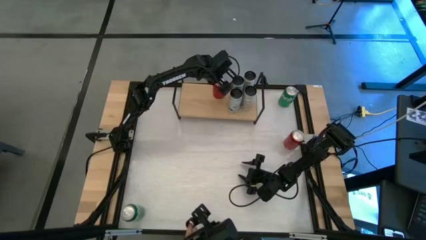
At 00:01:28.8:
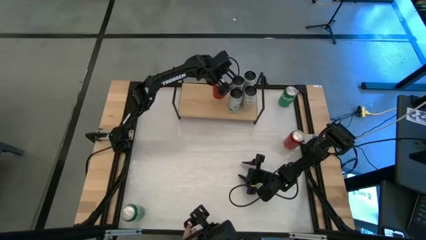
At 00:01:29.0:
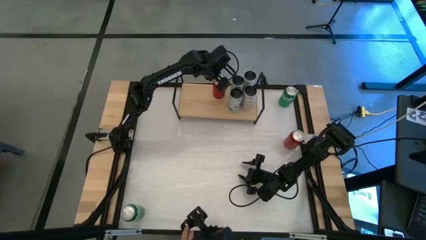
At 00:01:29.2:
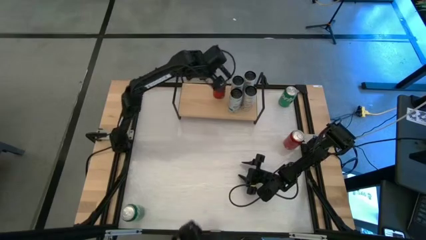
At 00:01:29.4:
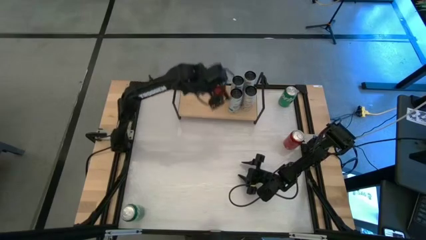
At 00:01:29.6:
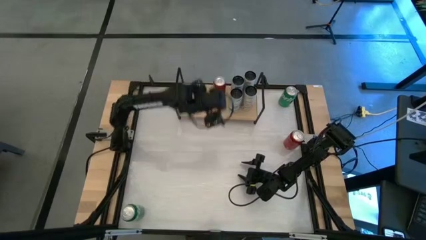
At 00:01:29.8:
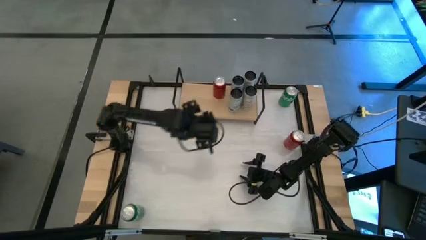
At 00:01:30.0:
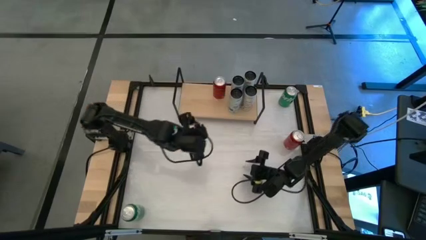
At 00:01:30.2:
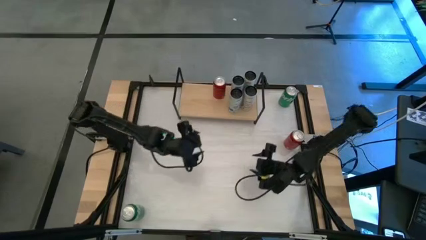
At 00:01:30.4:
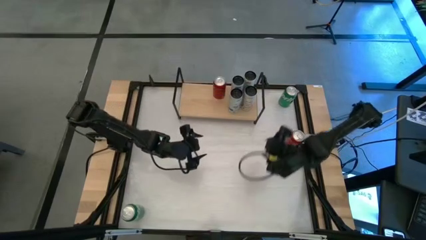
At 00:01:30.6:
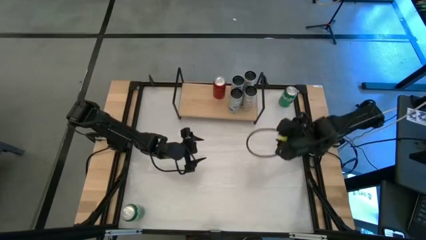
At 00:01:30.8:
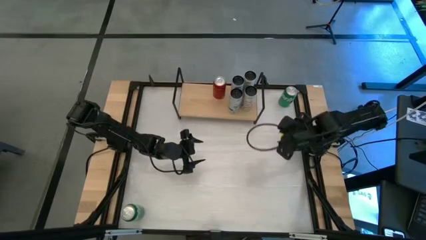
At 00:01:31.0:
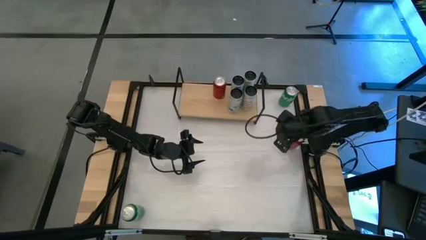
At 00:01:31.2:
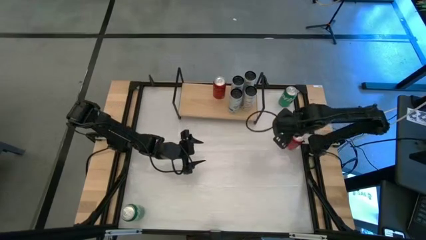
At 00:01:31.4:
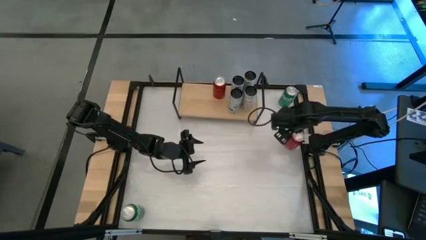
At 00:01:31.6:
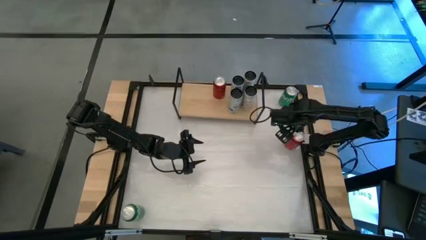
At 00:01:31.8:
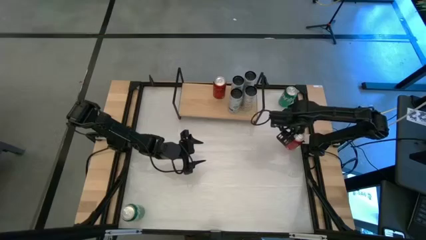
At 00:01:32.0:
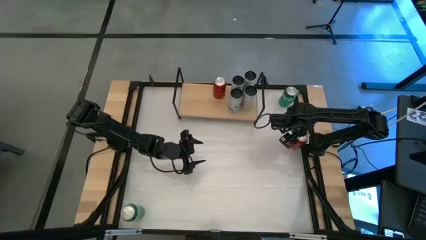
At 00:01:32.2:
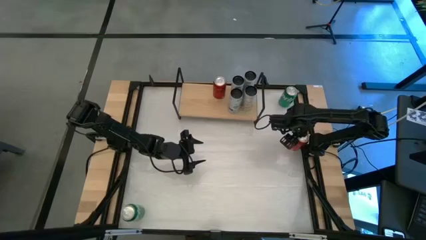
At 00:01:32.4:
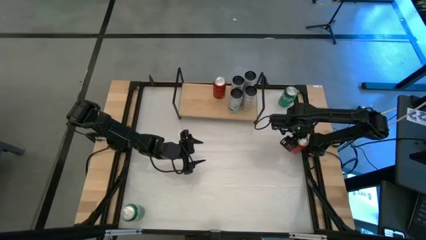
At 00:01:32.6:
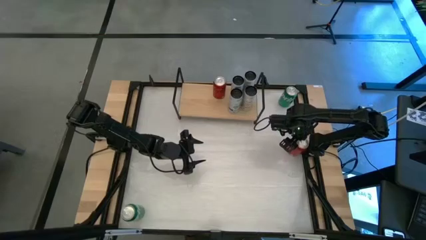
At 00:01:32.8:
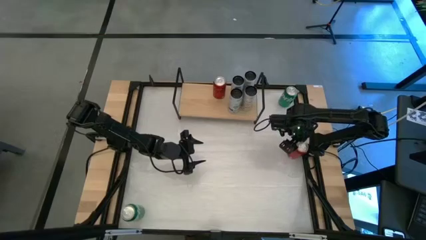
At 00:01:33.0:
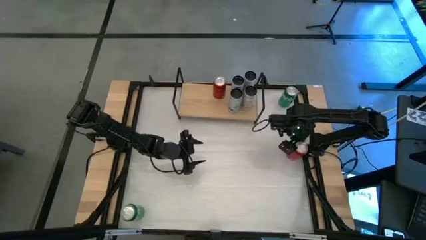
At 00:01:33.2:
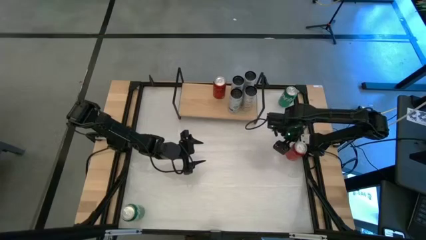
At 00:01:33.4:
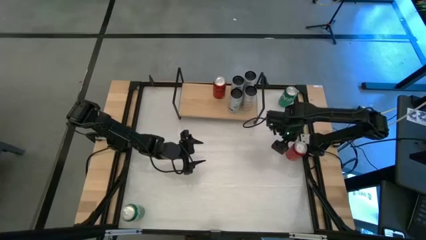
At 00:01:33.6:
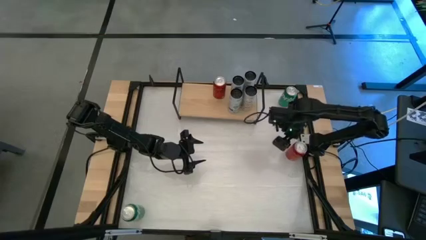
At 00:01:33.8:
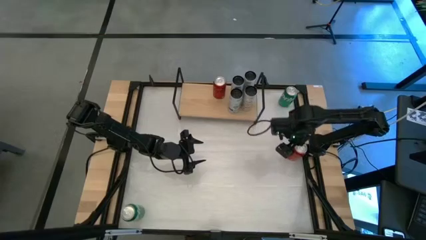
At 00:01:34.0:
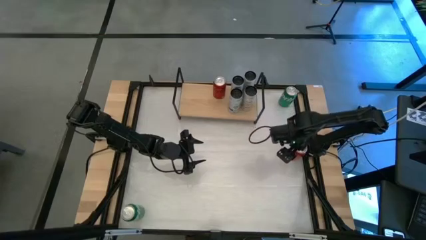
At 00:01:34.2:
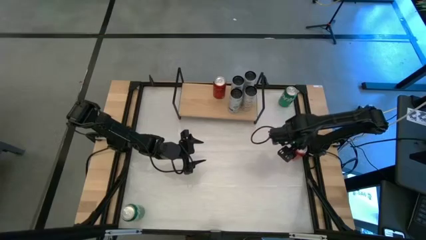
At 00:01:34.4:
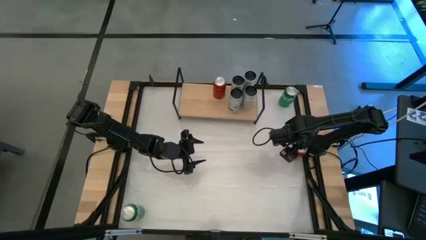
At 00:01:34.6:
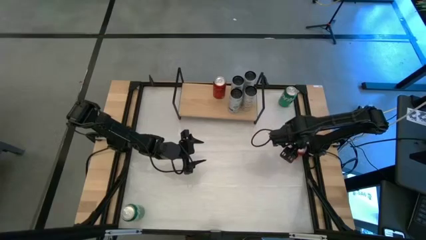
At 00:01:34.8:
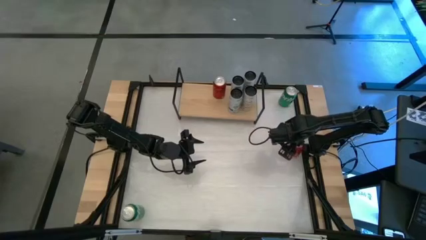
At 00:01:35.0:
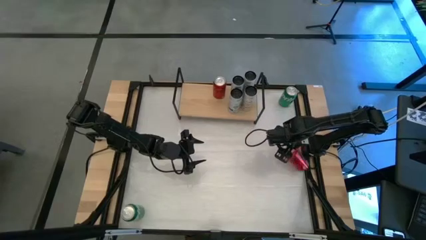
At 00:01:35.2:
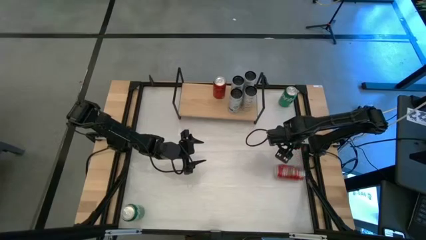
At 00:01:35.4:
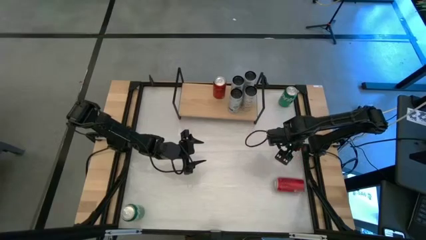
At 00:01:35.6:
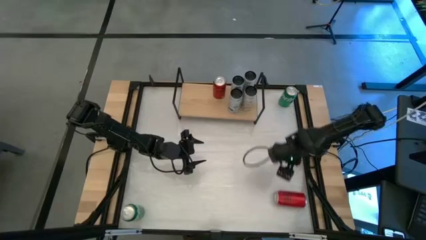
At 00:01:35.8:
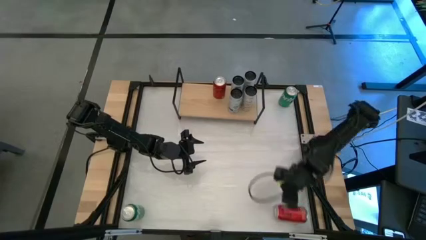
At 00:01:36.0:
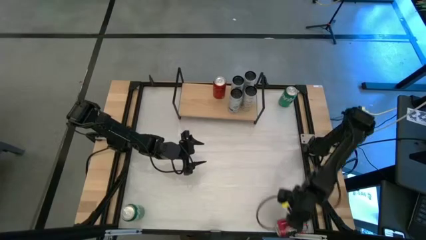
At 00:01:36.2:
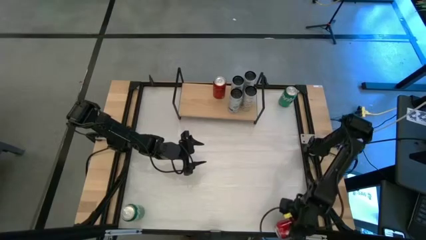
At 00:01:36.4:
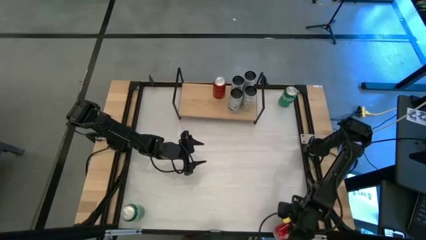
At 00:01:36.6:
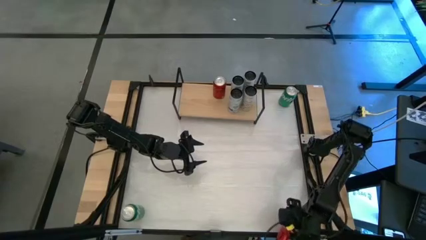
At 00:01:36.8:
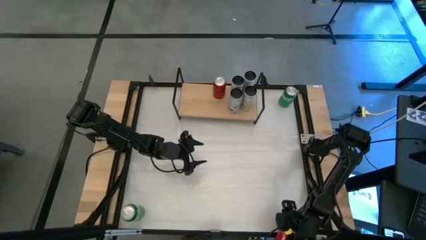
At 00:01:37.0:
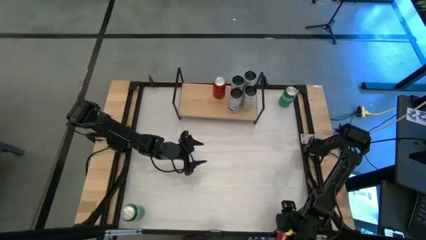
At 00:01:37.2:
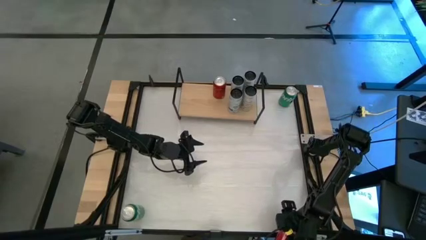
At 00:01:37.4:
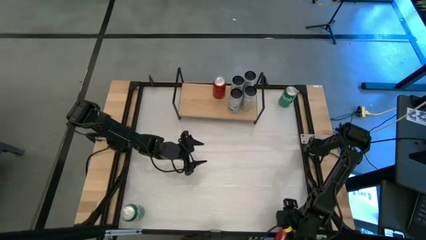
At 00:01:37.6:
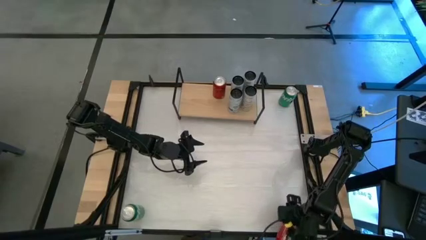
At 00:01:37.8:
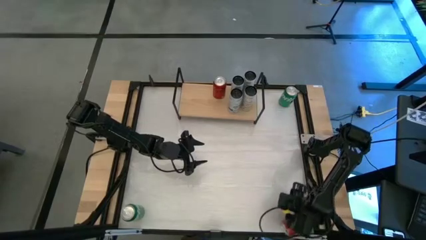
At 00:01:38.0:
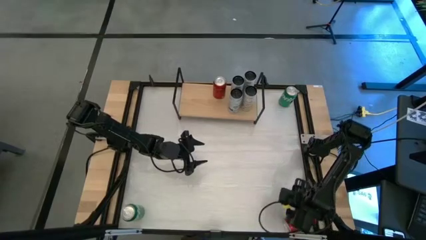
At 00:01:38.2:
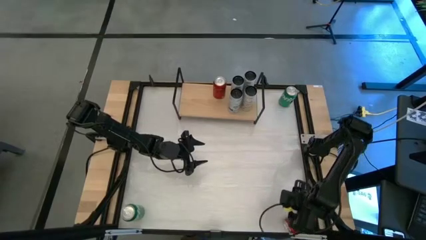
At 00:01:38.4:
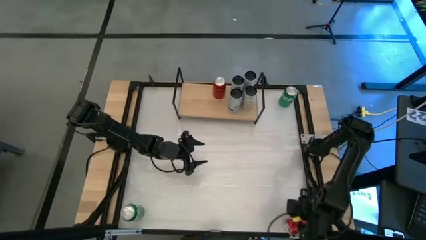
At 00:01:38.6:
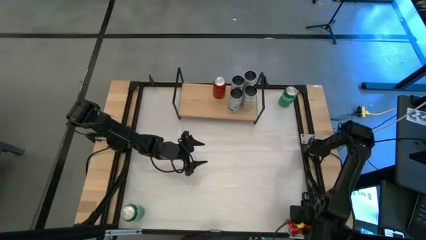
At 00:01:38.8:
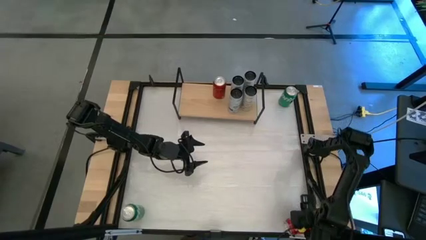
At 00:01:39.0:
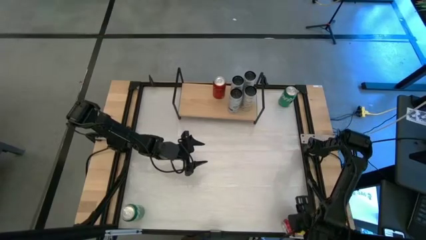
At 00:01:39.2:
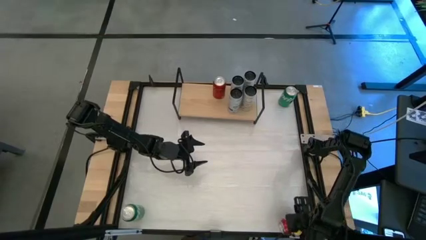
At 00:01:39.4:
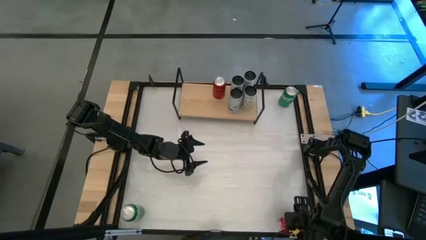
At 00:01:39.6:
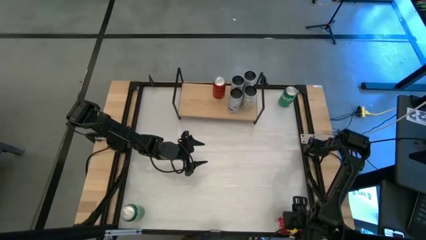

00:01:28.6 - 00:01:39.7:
Task: Place canned beverage on shelf
Put the red soda can on the shelf aligned with the other red soda can

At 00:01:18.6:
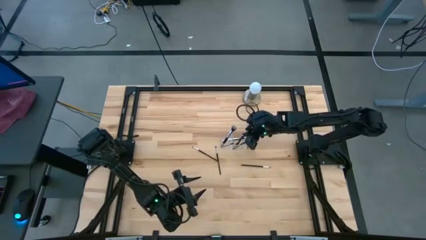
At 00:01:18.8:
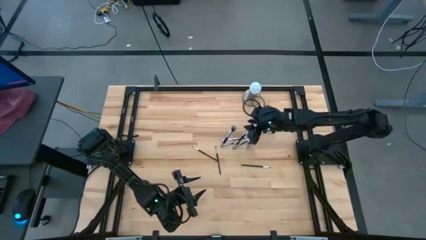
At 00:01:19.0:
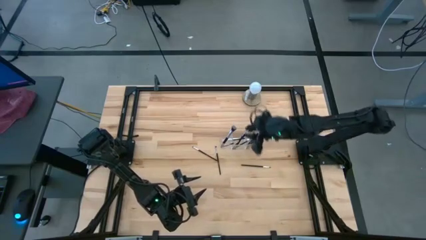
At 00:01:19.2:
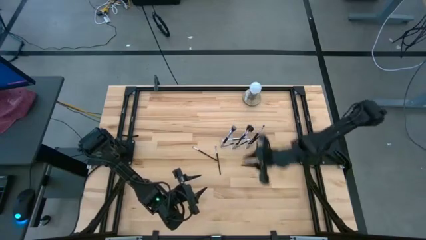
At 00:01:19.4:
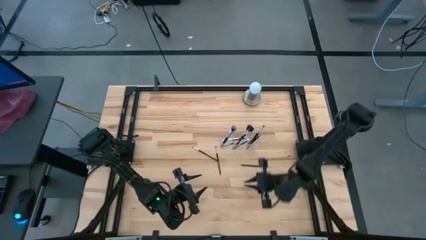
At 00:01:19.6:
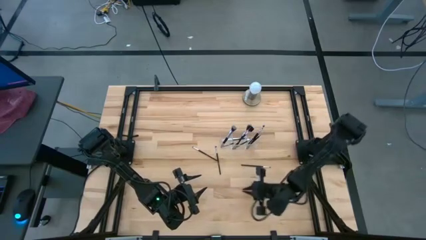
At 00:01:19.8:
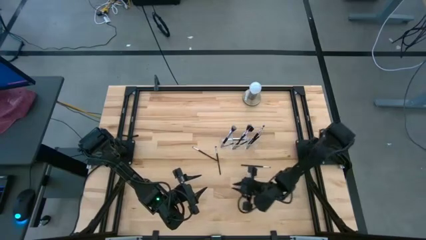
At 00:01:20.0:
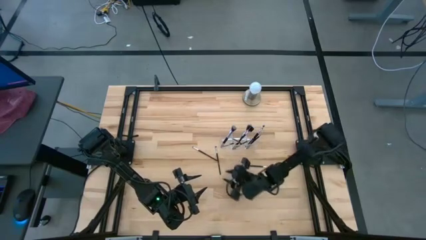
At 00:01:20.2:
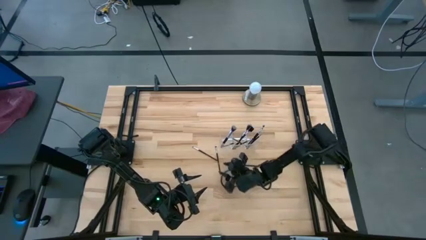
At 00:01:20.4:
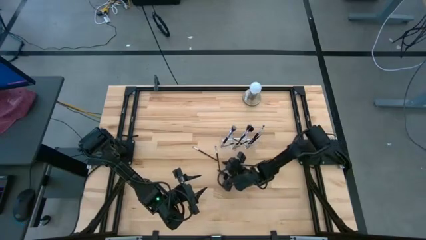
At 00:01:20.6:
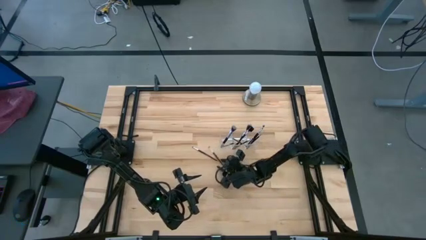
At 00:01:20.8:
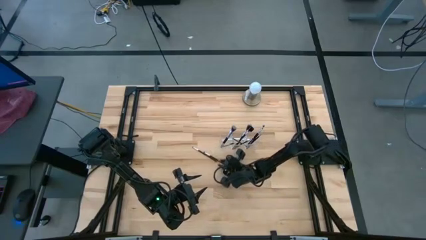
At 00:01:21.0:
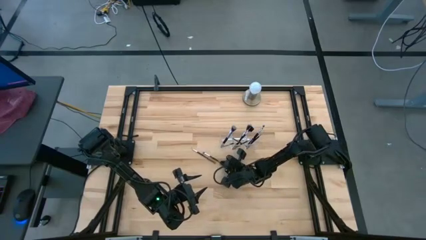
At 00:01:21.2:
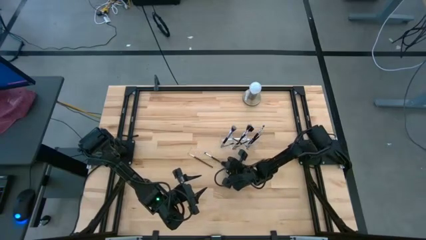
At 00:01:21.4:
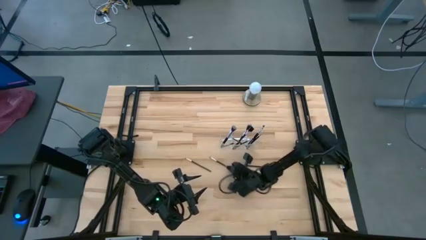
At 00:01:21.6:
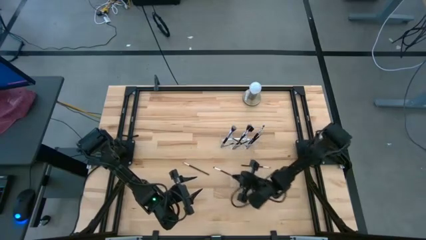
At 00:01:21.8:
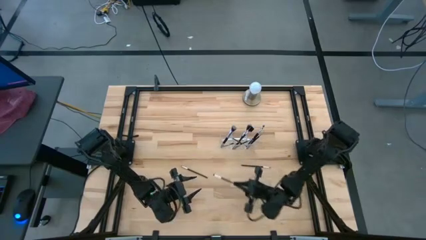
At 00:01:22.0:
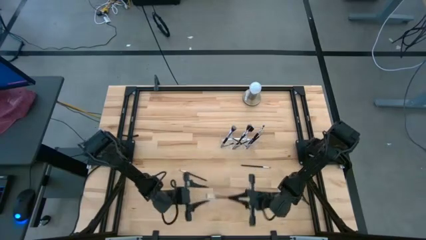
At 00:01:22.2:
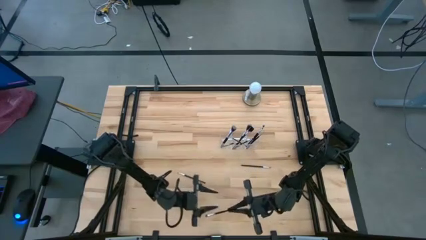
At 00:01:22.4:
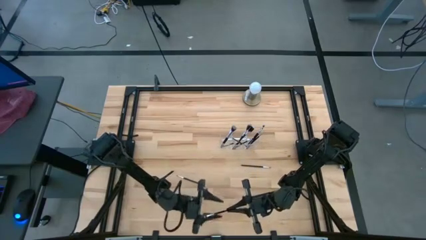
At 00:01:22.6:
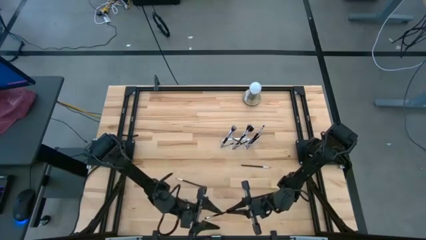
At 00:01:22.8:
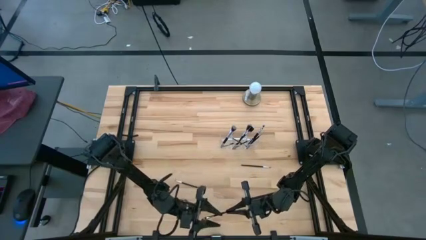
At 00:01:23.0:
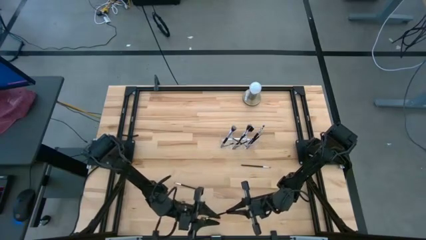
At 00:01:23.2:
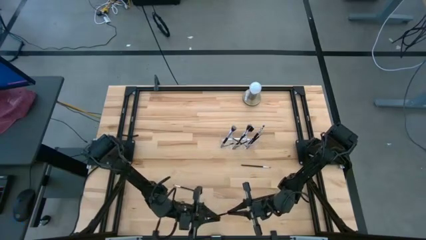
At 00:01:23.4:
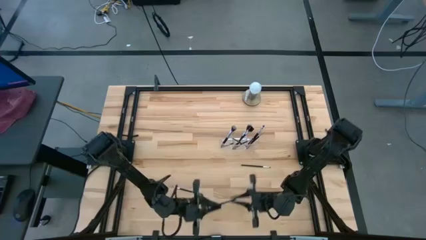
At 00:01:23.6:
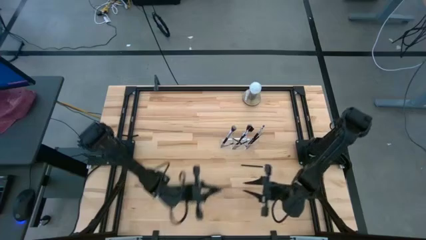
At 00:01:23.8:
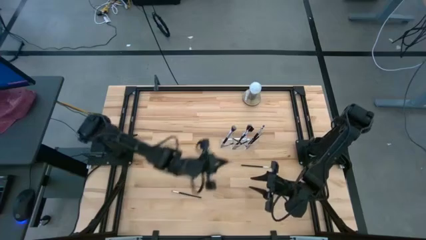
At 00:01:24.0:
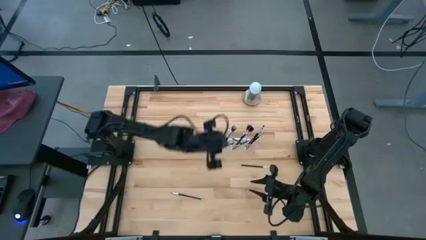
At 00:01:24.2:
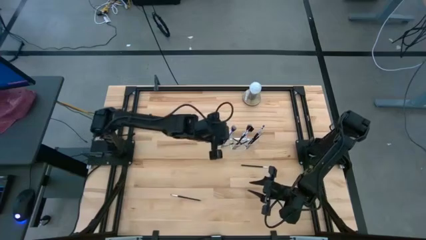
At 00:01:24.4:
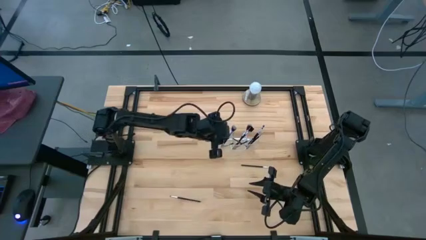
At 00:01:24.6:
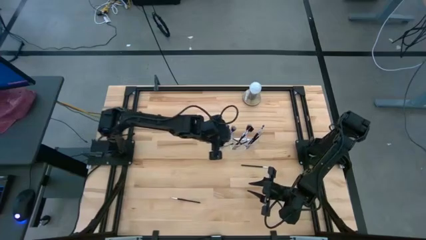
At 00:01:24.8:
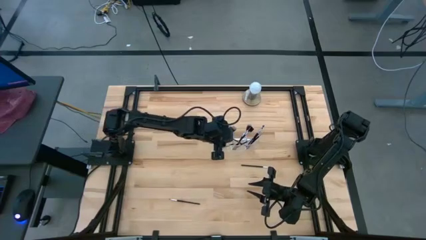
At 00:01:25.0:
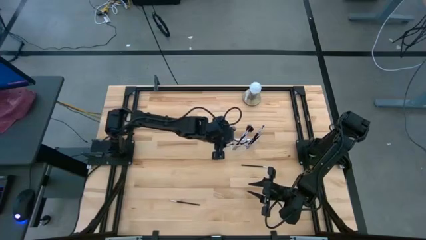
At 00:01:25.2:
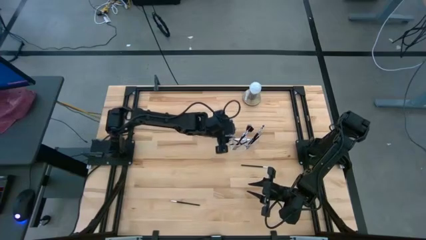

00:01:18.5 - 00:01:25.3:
Task: Put items in baskets/containers
Put the black eyeshadow brush into the transparent organizer
